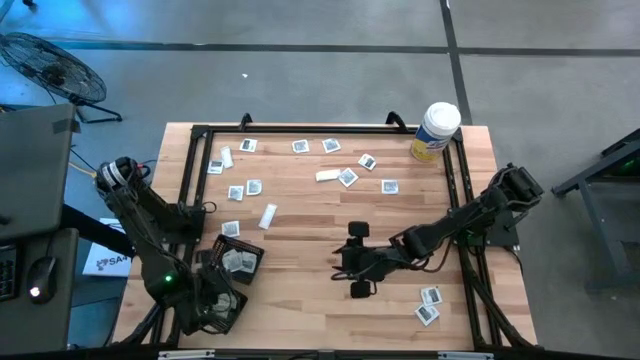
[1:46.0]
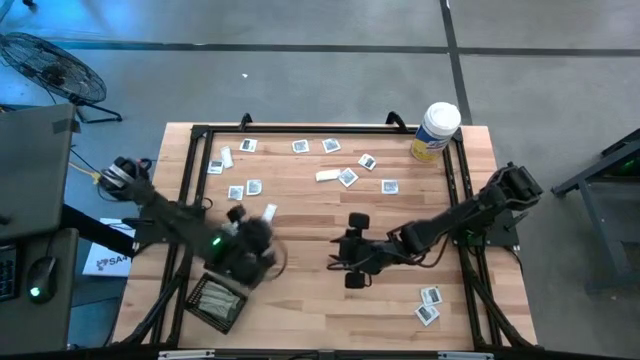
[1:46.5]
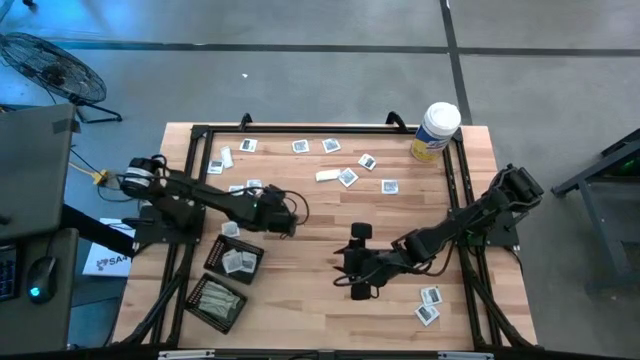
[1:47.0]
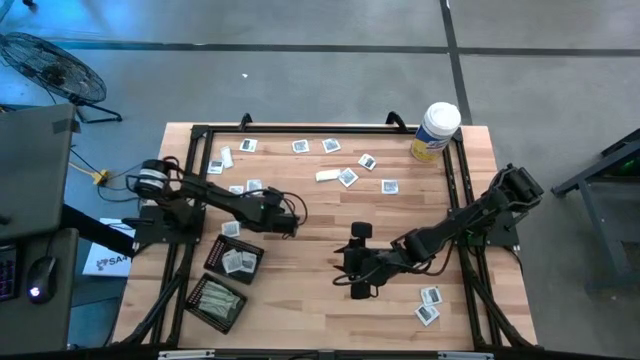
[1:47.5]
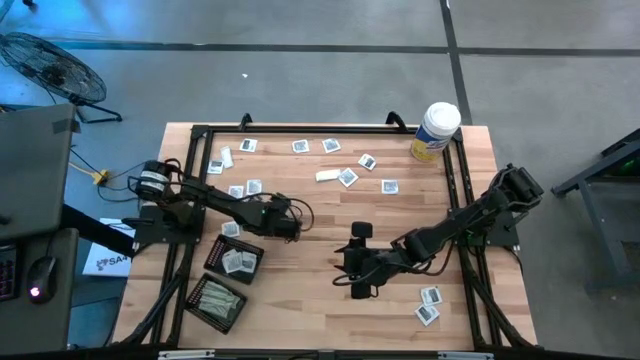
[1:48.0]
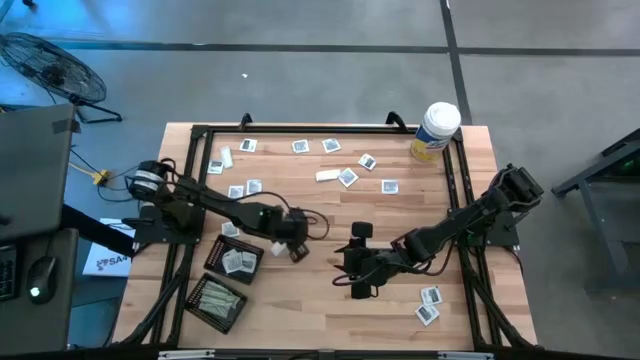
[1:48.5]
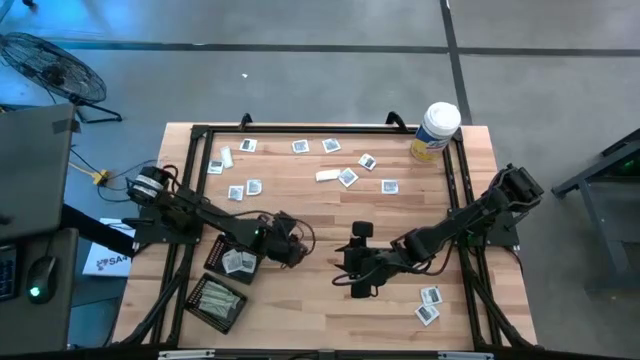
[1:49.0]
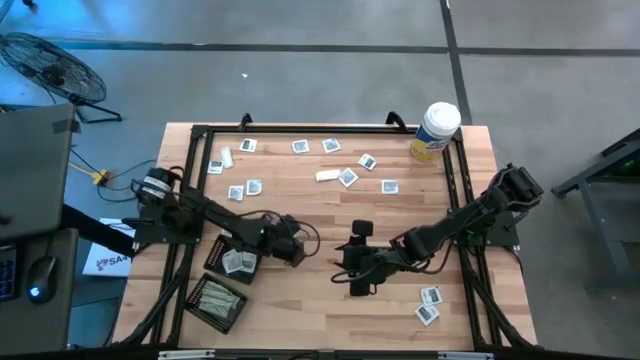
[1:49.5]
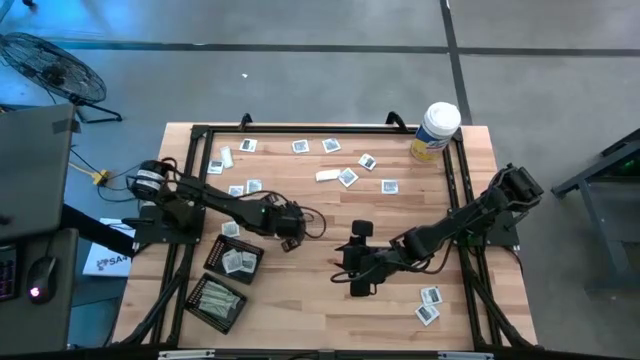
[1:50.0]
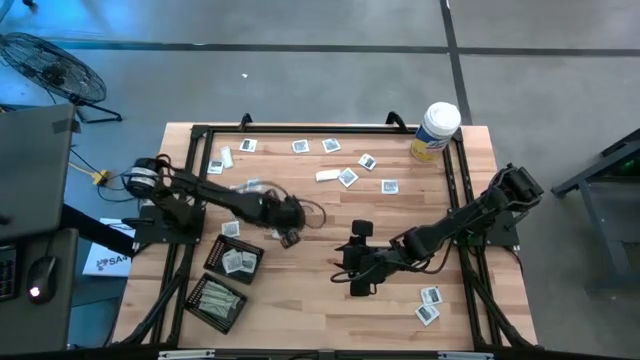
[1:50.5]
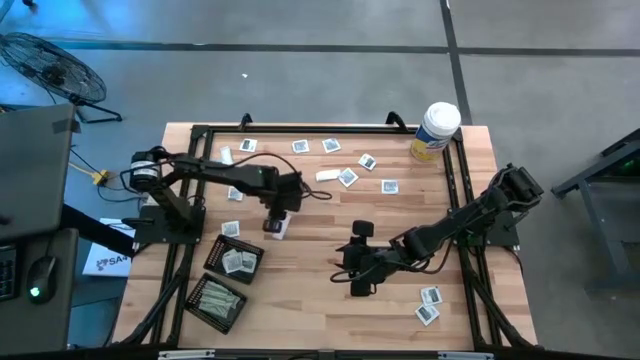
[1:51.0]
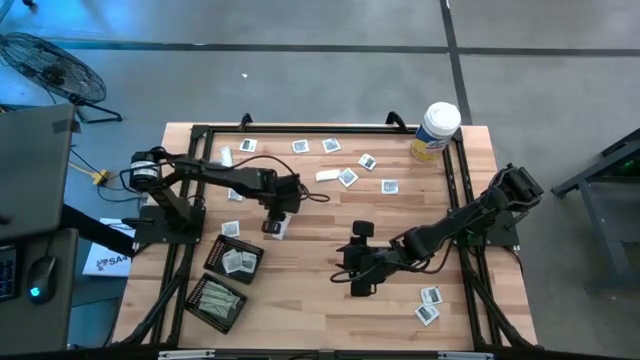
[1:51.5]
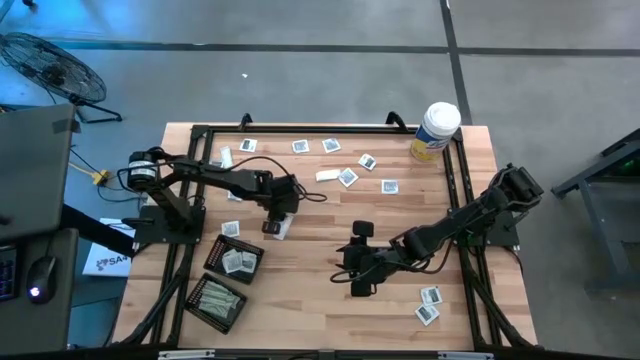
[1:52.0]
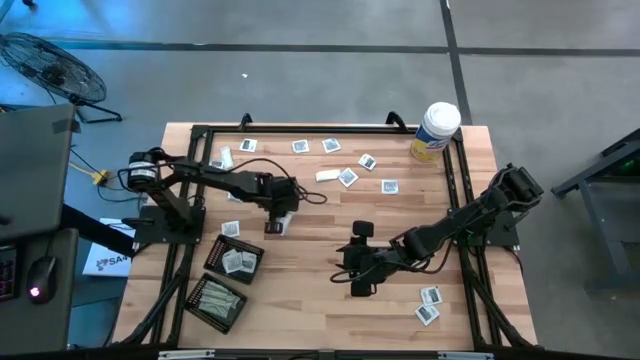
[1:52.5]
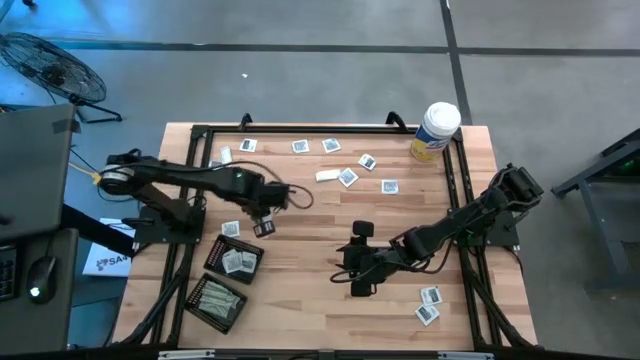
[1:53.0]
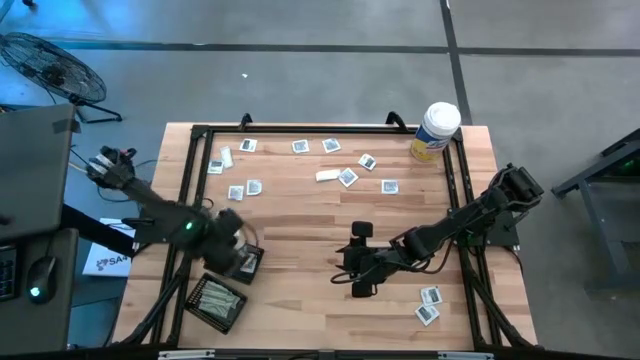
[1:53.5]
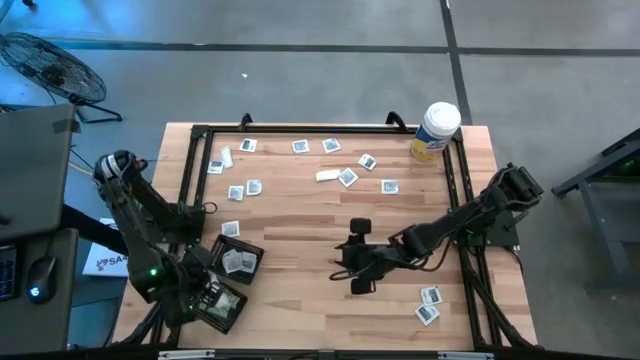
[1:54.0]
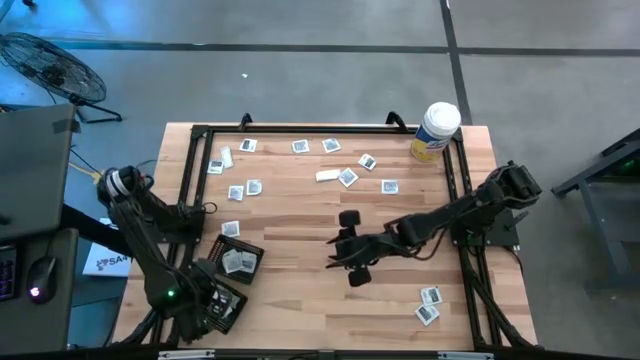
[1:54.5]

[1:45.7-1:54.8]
Task: Pick & Place First Aid Supplies
Put the bandage into the bottom black bin

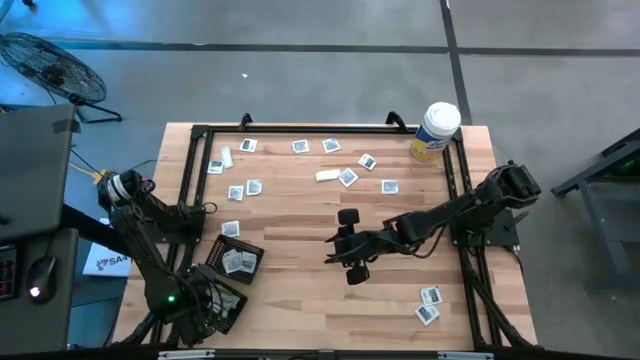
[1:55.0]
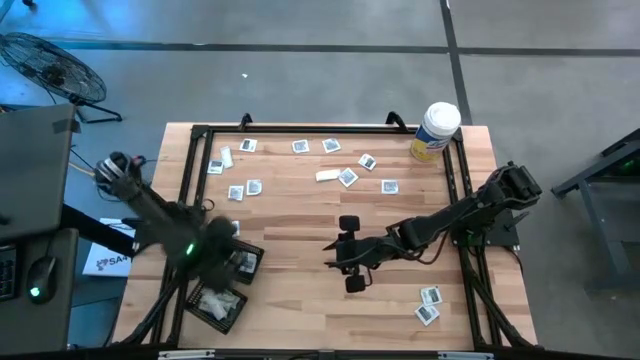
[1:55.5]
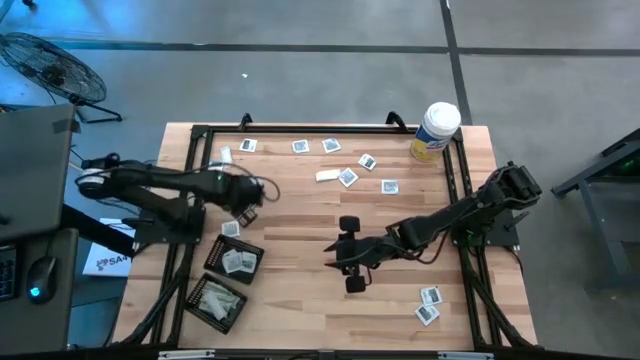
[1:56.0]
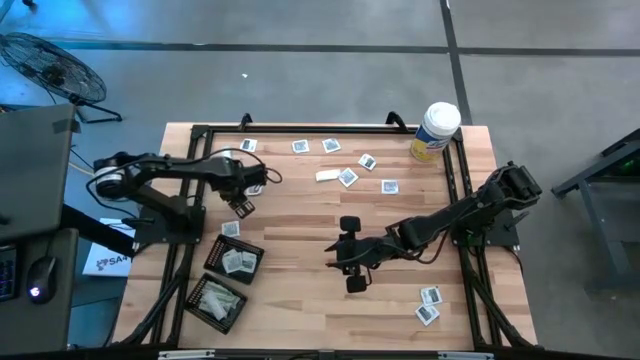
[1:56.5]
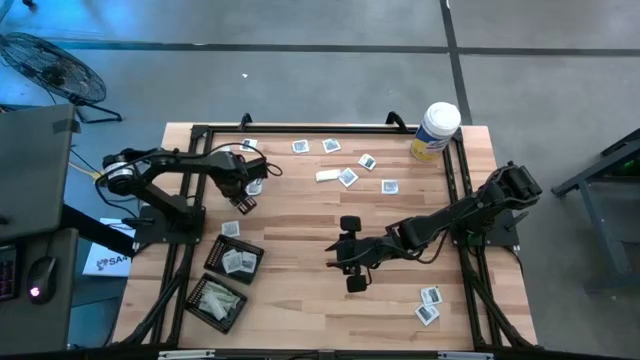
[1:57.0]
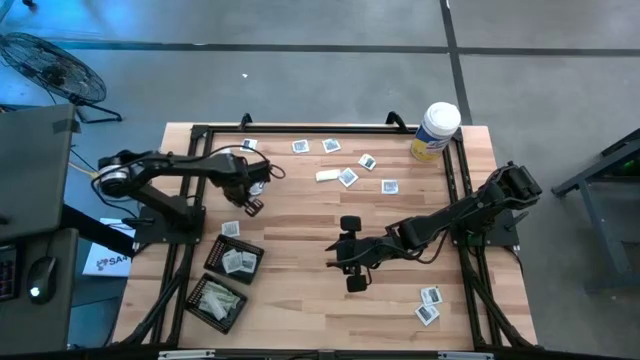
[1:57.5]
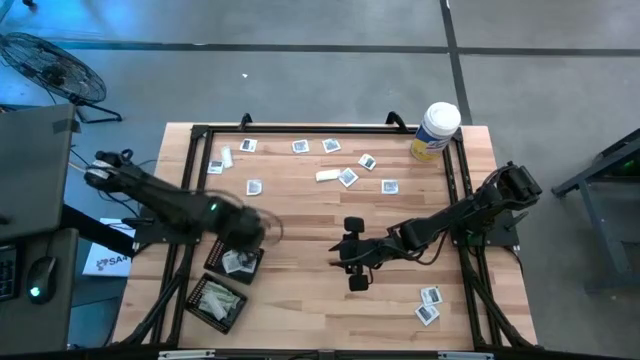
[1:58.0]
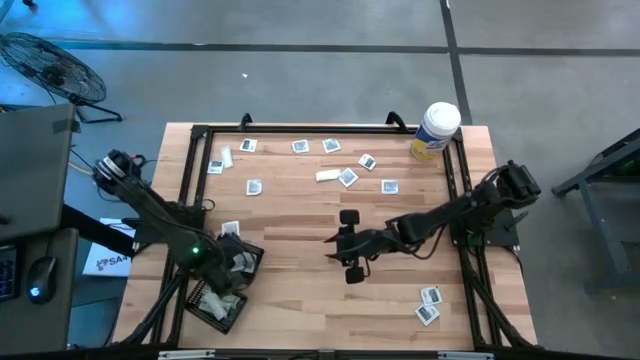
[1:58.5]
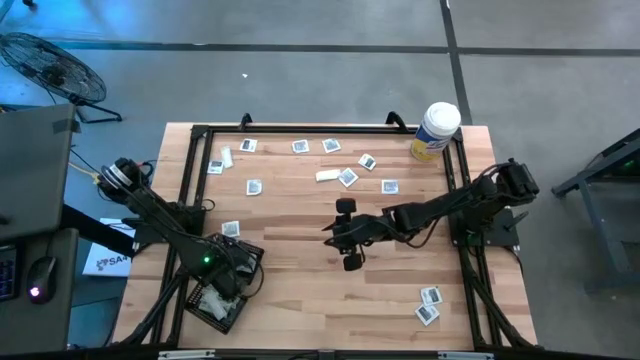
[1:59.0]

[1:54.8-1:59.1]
Put the towelette pack into the top black bin

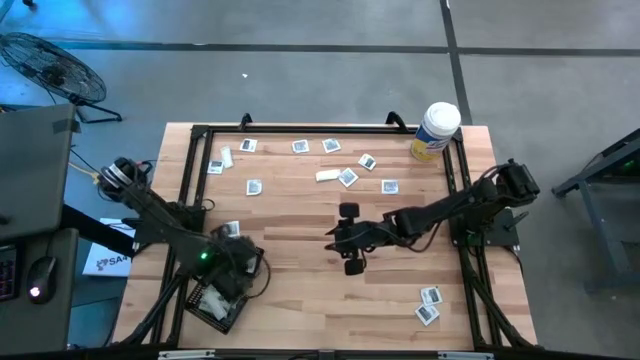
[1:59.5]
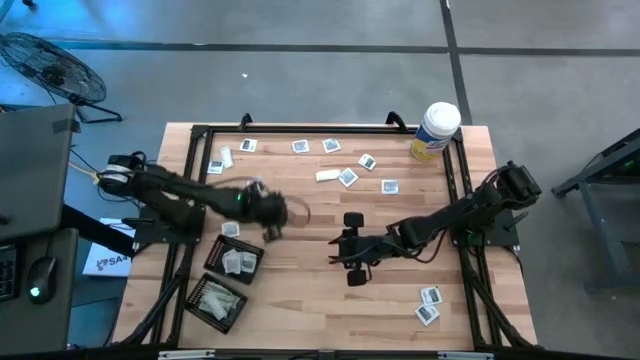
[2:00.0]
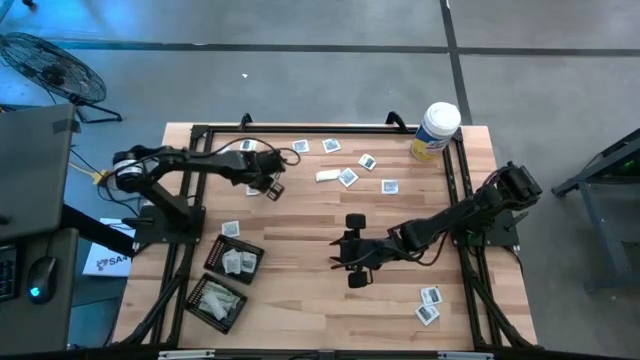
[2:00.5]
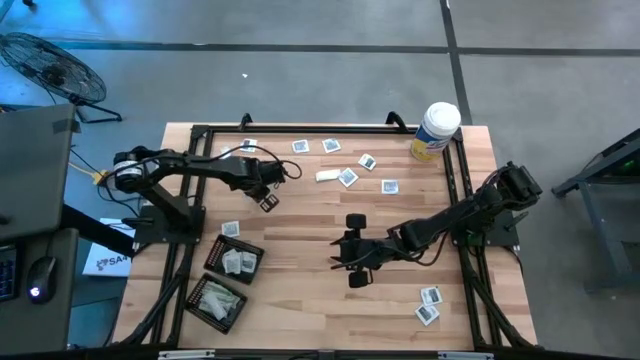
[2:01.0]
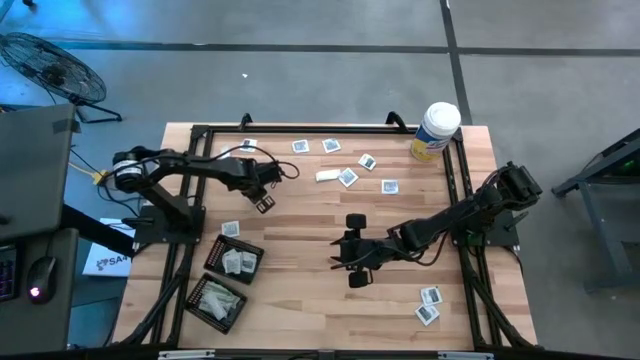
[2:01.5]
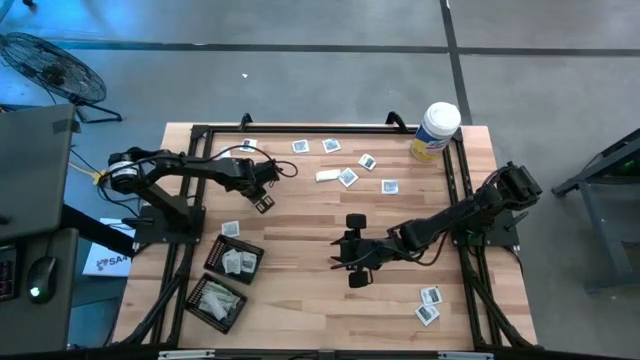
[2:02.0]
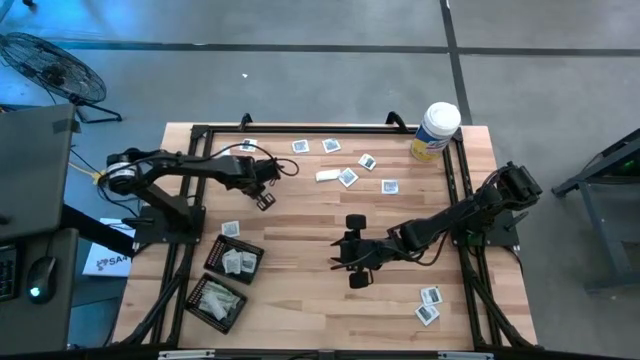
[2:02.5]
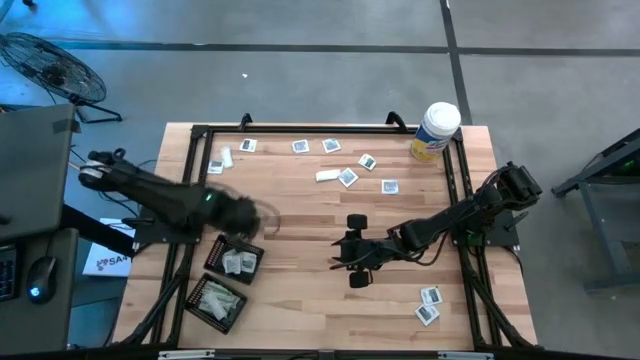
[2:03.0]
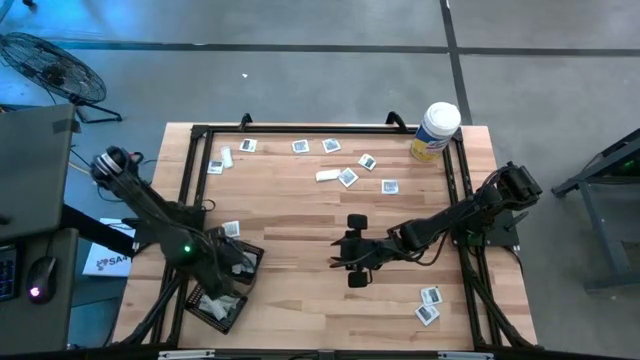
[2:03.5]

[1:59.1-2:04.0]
Put the towelette pack into the top black bin

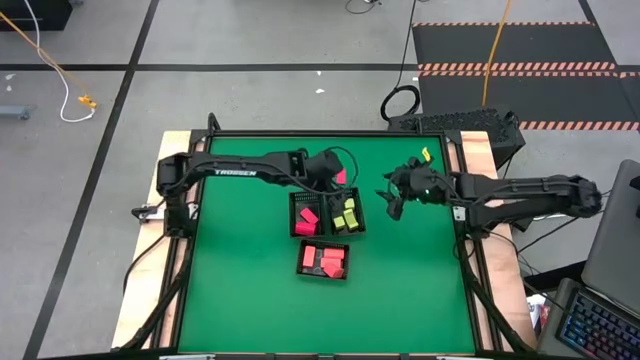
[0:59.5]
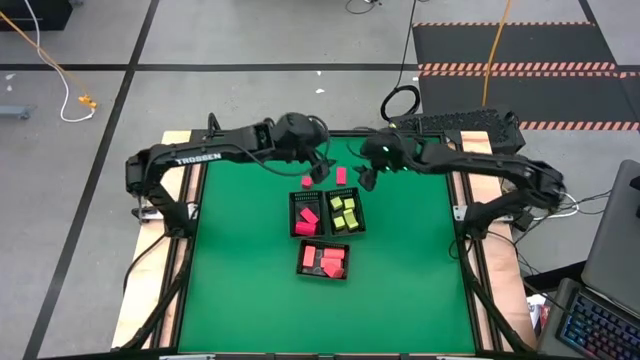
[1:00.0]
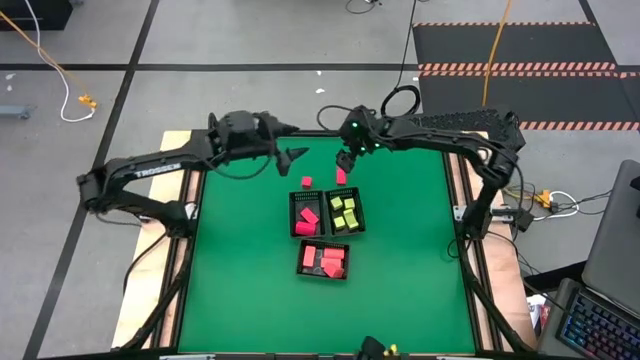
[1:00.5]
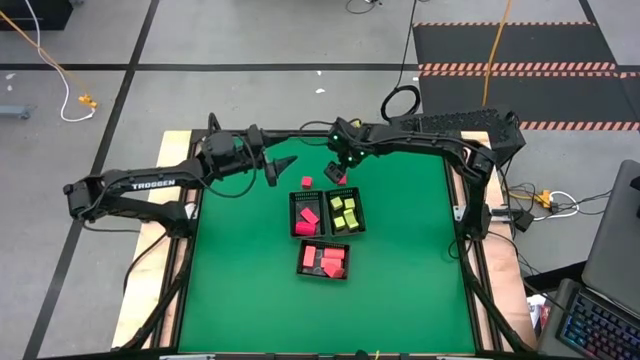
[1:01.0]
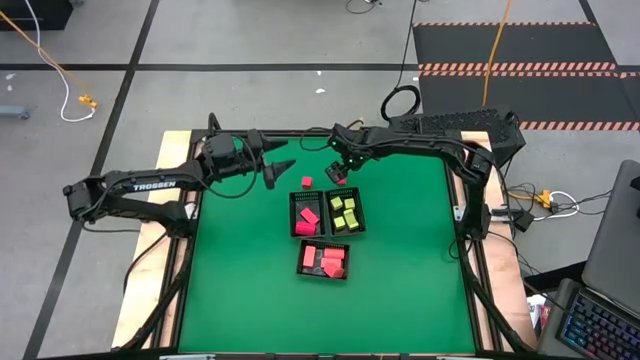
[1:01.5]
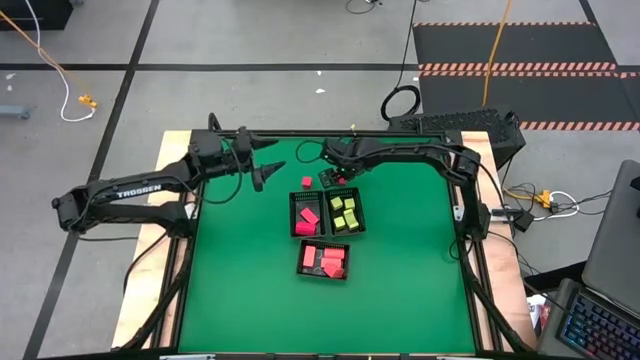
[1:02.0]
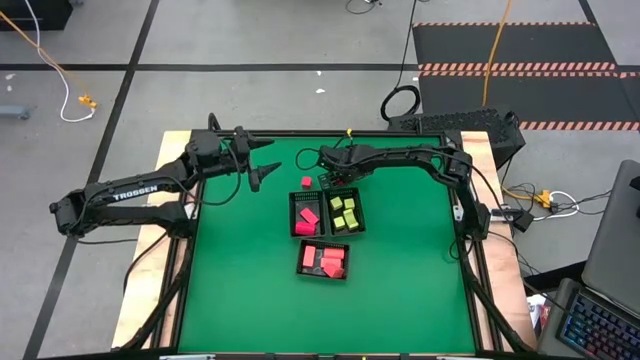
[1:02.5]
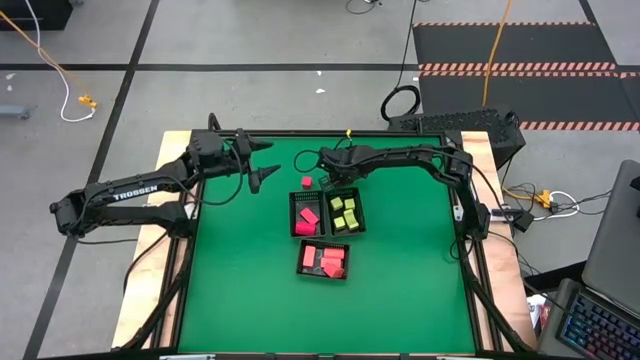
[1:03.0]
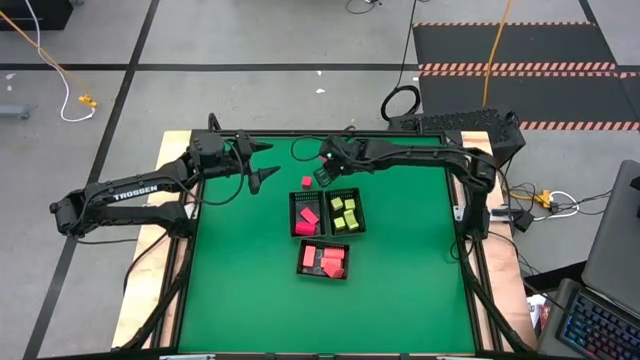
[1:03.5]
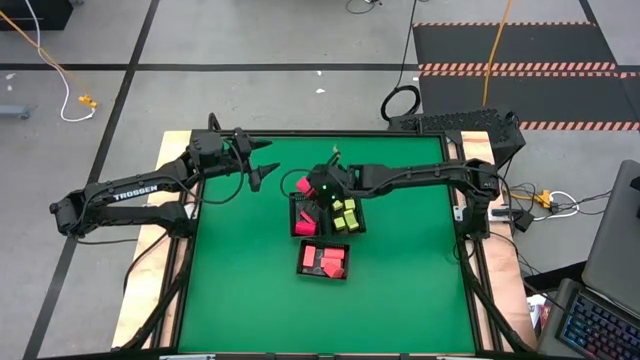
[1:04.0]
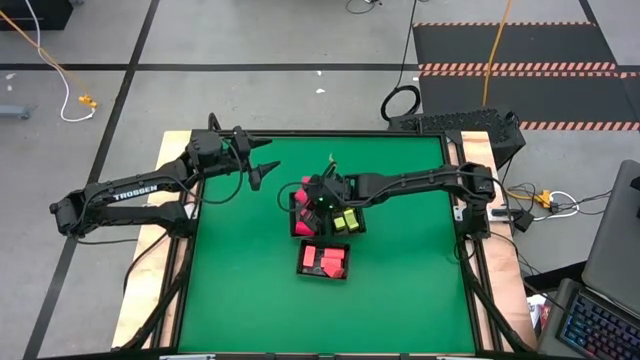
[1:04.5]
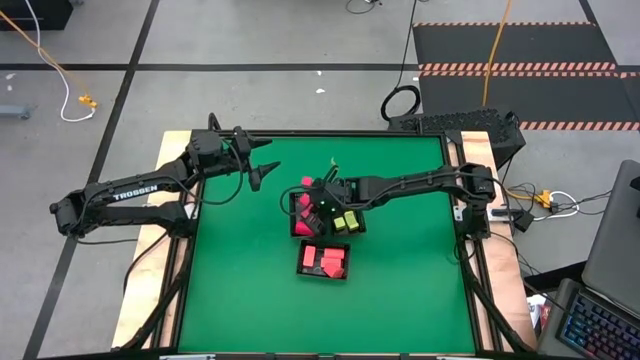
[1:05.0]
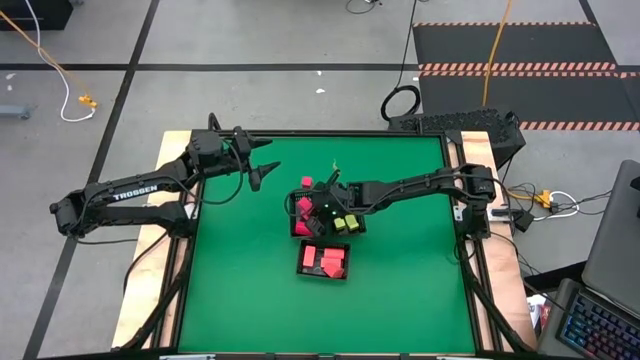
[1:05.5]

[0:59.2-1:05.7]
Task: Sort & place blocks by color
Put the red block into the top left black bin
